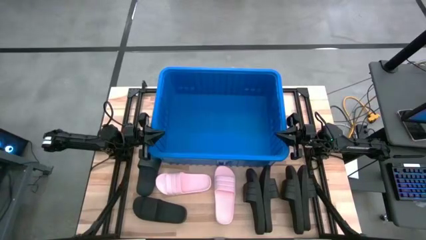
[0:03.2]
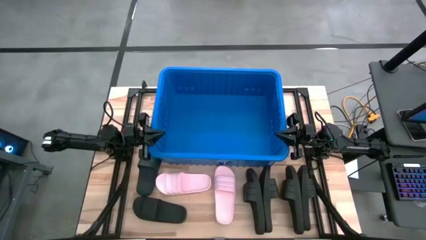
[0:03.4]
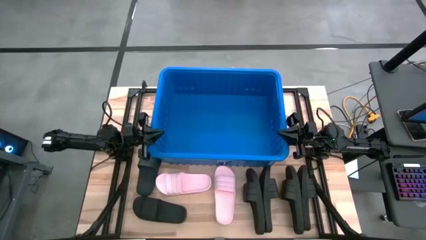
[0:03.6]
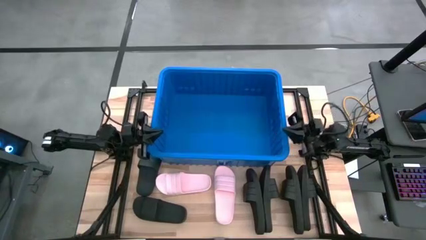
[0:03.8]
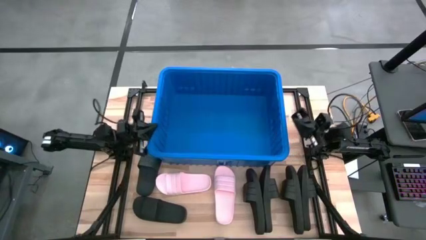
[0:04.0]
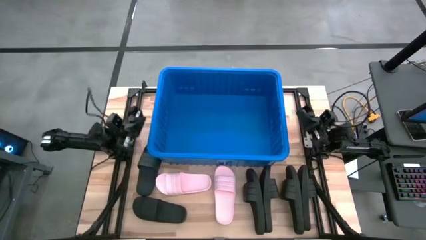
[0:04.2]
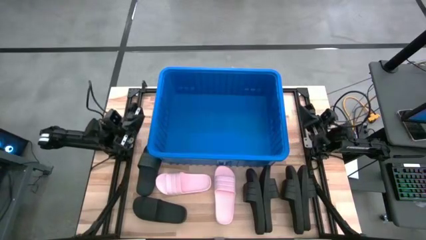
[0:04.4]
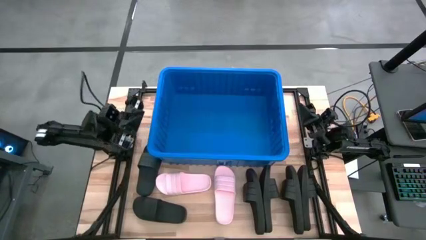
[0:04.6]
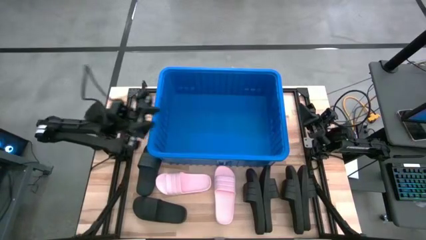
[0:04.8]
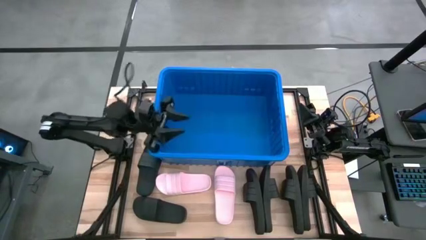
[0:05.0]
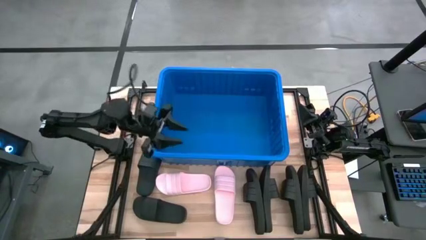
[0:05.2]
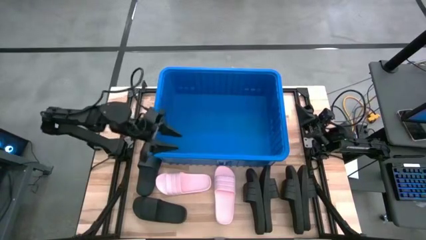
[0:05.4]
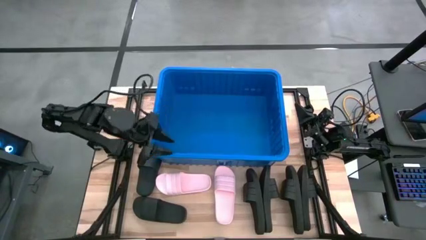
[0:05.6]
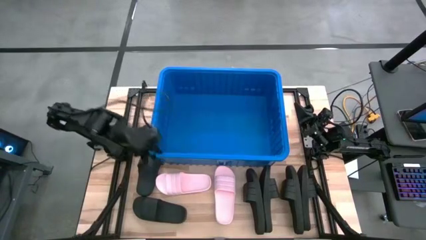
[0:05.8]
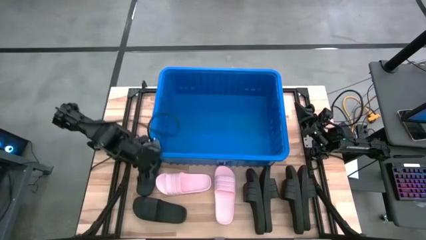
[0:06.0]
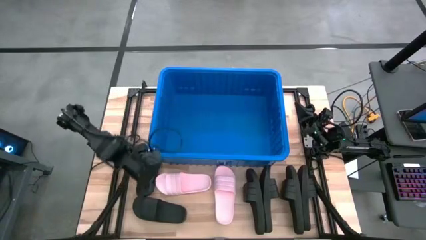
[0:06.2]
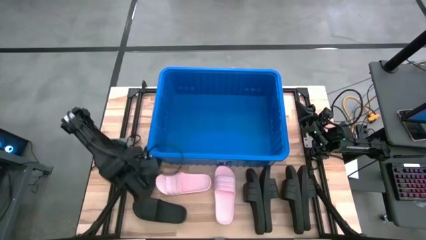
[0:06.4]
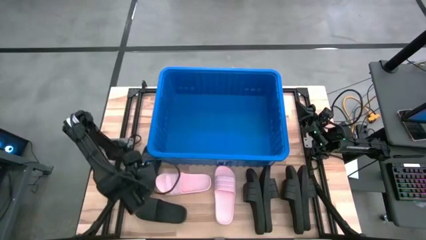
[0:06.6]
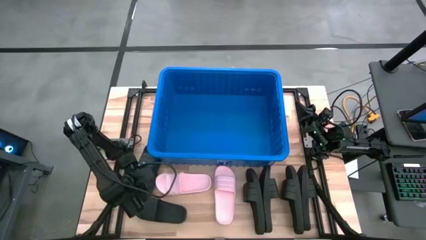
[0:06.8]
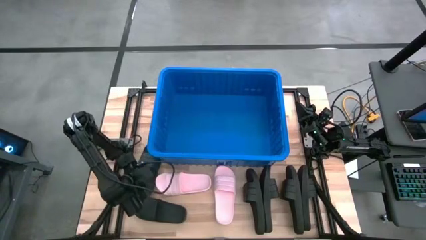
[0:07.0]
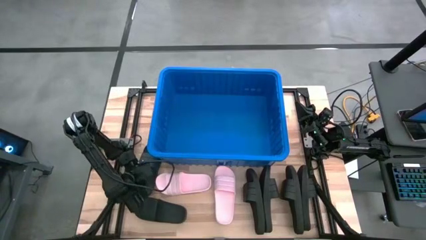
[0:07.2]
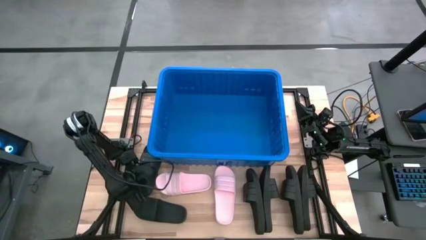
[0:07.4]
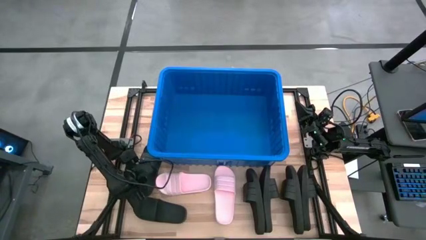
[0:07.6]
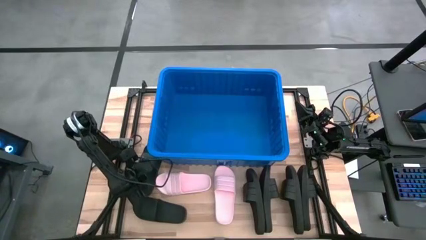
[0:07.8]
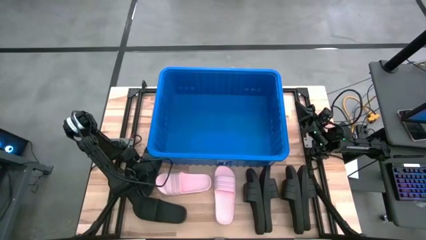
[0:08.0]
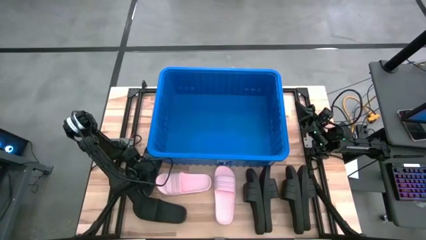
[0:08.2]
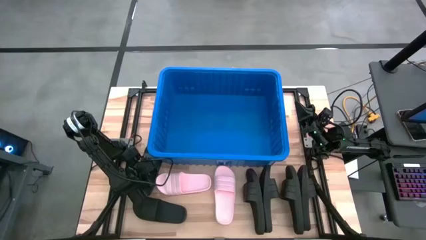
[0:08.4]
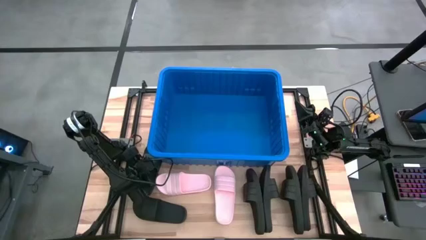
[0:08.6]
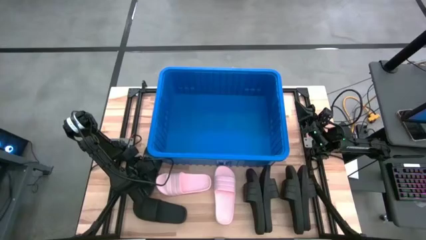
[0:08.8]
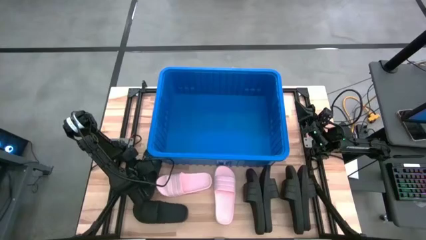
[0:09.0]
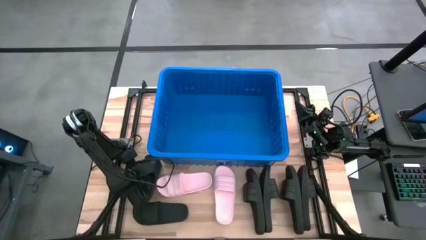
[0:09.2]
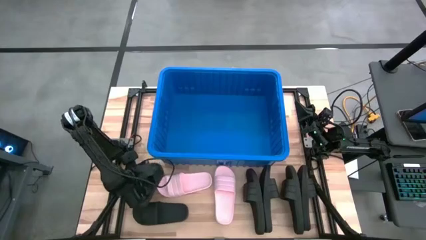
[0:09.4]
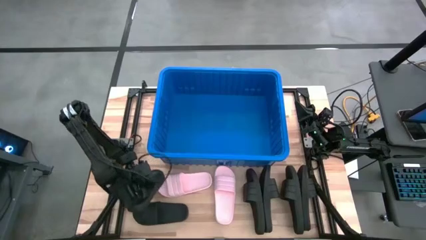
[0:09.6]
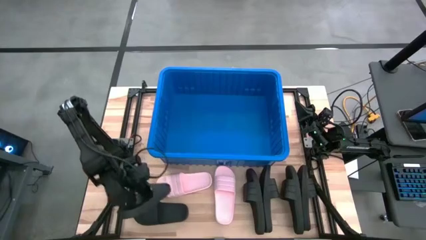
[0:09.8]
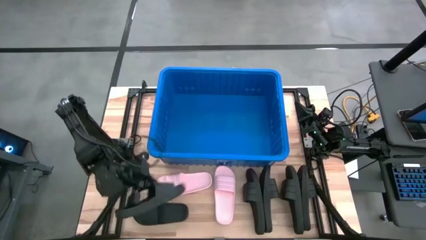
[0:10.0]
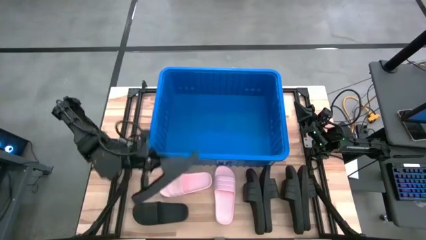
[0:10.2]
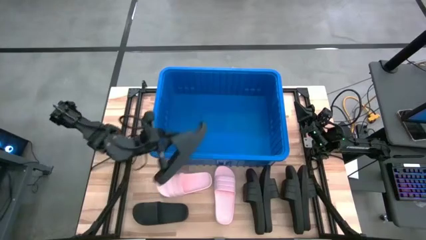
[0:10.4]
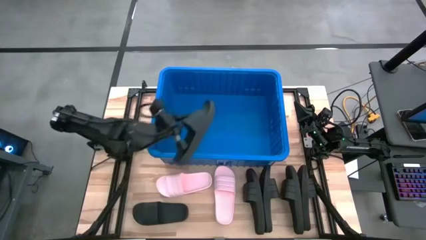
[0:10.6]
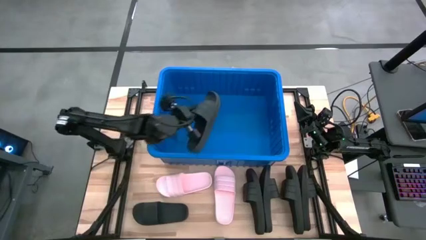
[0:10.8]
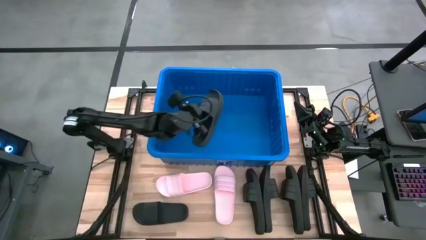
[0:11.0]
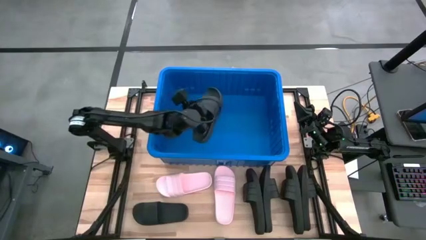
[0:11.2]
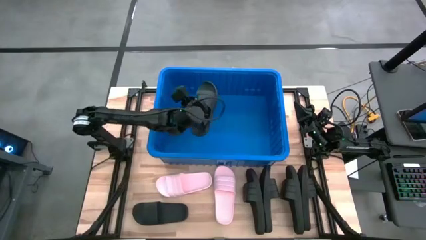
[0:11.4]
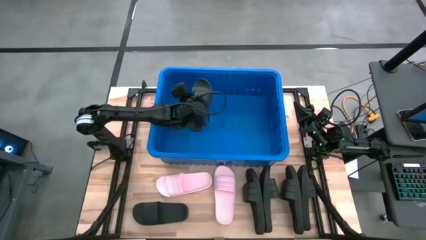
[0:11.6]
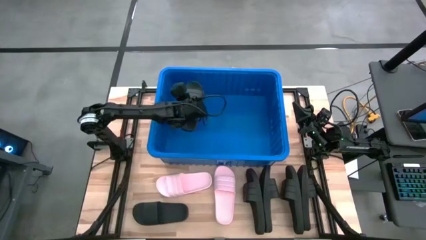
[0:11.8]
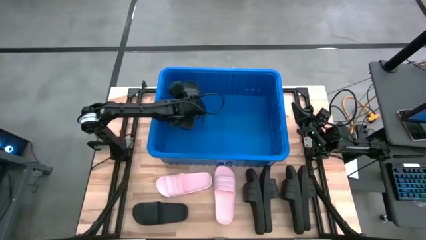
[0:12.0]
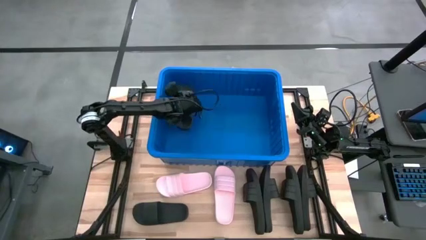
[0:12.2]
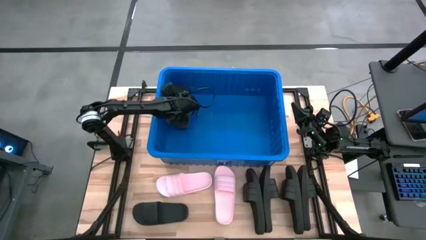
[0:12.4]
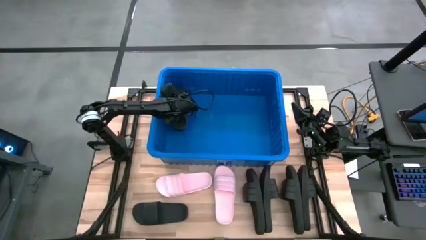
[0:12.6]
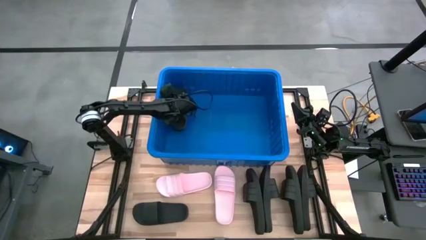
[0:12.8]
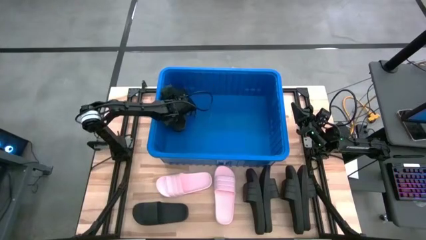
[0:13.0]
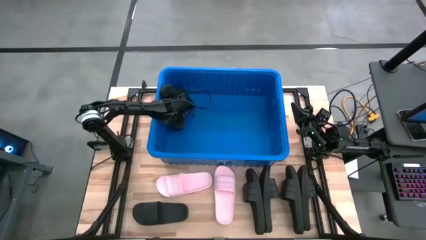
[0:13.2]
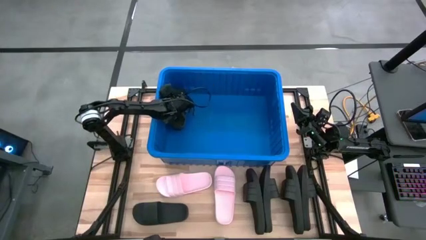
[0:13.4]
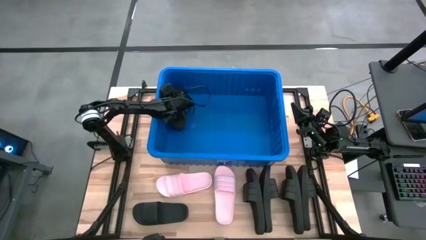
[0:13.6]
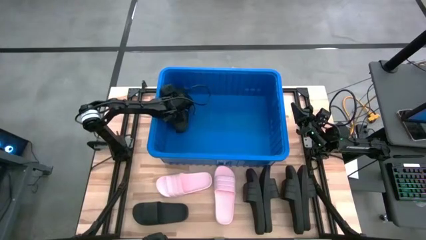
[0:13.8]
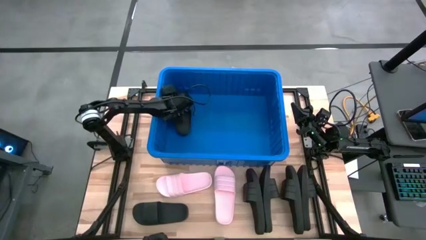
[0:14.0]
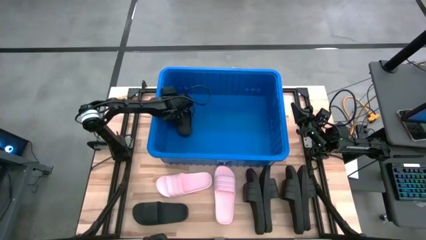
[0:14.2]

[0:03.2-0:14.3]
Task: Pick and place slides into bin
Put the black slide into the bin

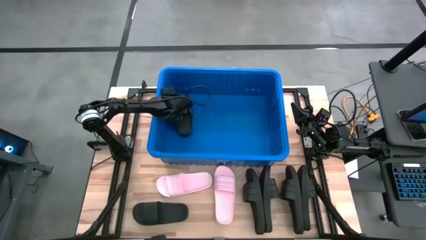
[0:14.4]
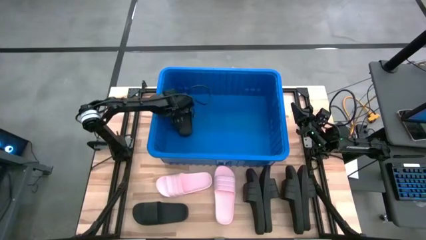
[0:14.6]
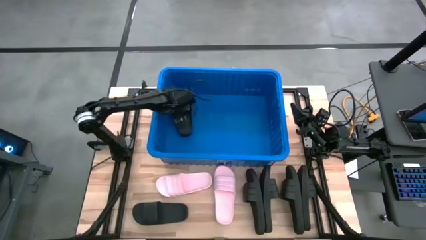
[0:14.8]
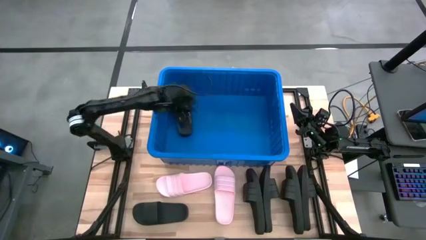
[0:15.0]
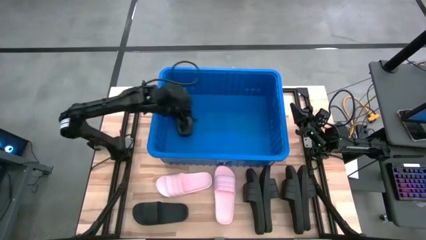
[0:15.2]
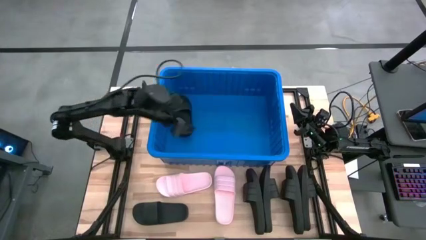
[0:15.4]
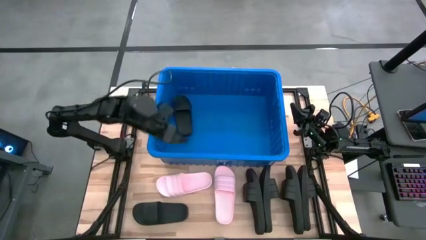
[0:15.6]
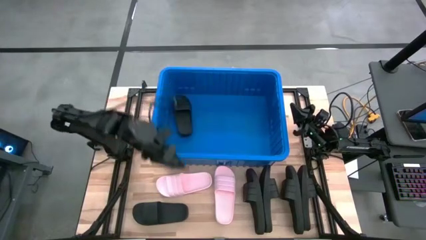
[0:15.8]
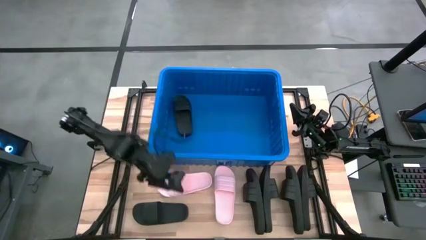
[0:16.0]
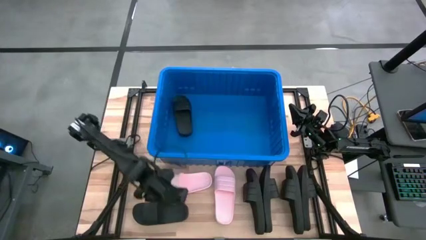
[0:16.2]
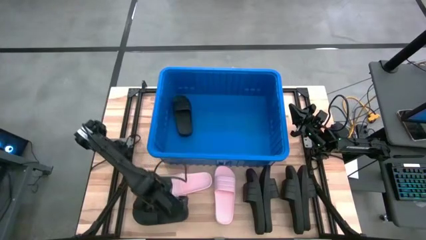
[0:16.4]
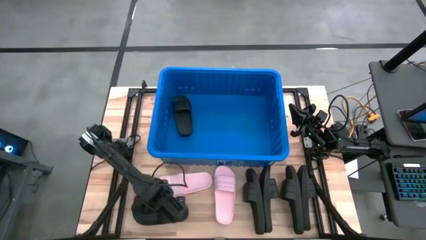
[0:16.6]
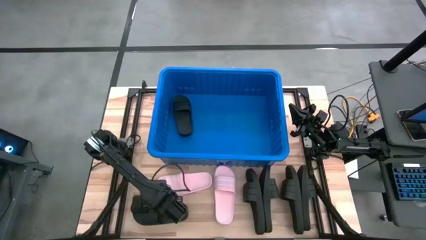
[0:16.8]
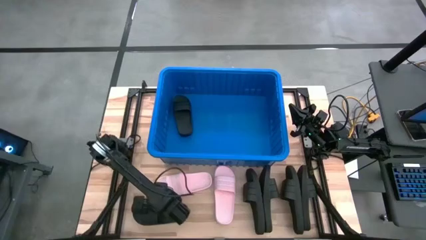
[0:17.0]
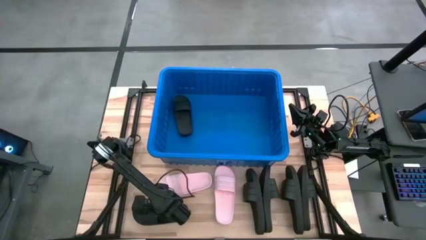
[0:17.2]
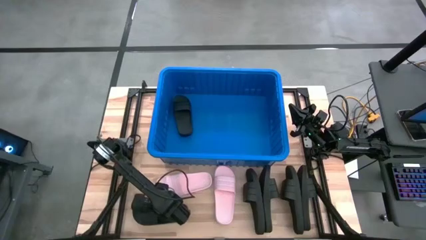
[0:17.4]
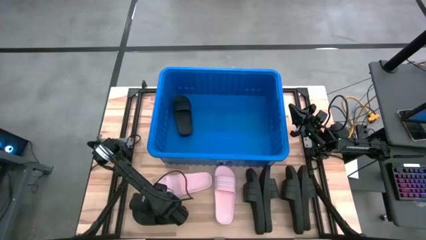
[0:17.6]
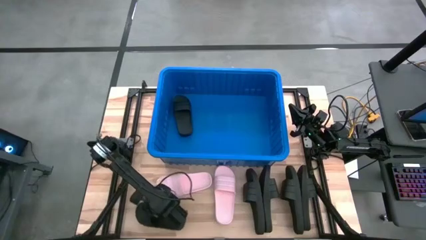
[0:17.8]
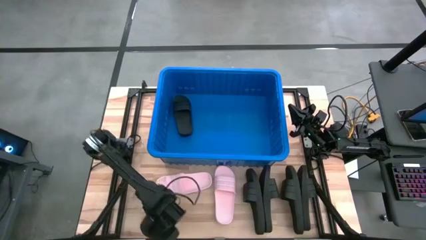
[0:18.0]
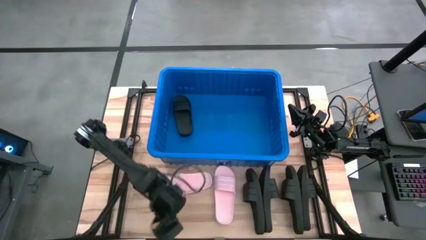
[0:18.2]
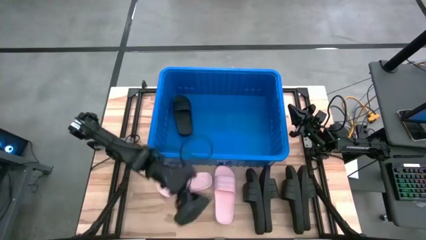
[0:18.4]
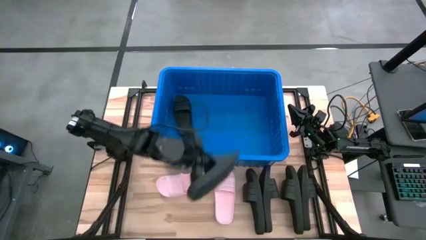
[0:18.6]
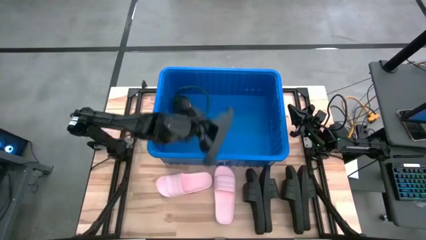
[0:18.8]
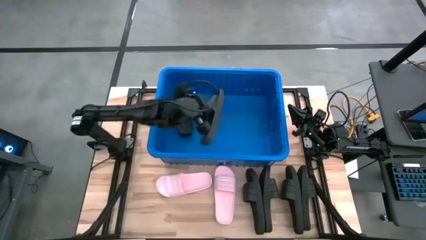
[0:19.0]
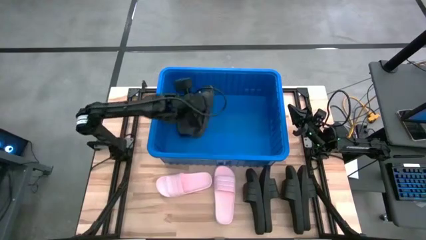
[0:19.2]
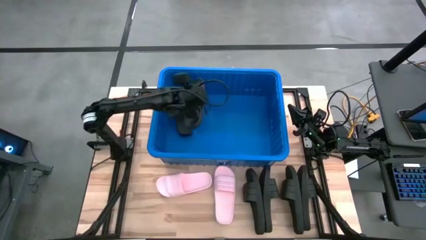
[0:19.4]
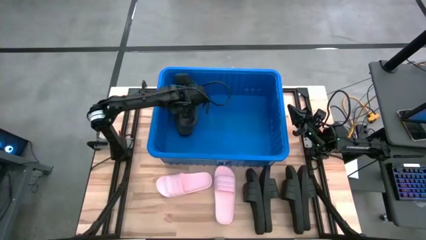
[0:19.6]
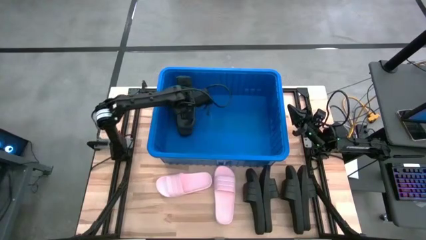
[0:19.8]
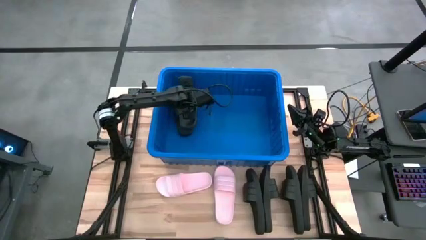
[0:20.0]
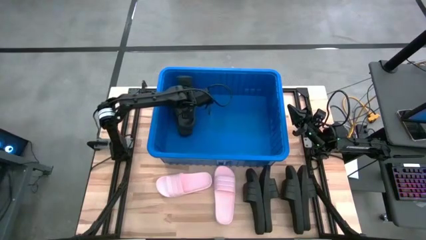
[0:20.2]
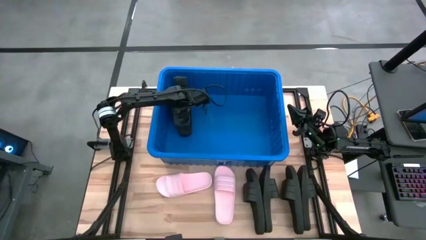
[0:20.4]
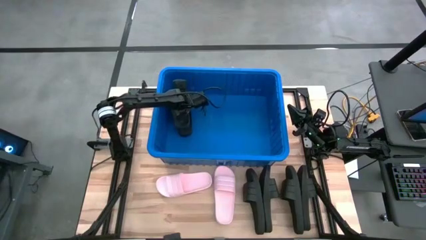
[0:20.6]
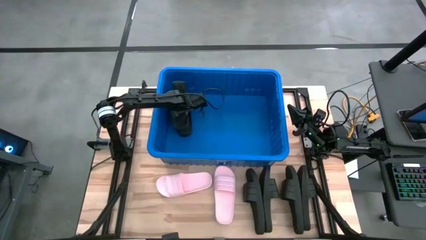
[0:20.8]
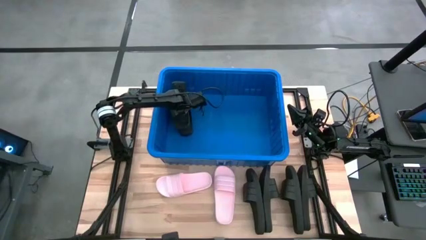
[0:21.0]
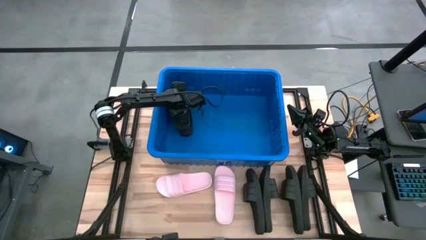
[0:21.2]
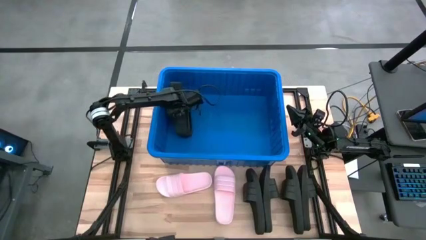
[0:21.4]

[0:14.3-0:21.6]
Put the black slide into the bin
